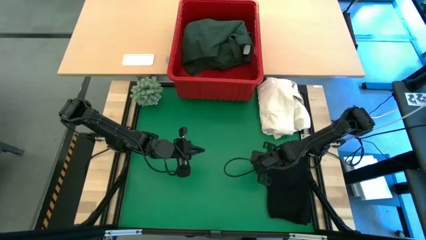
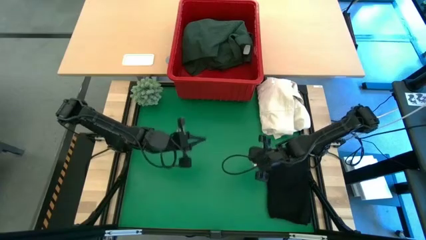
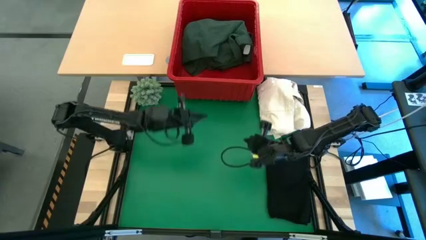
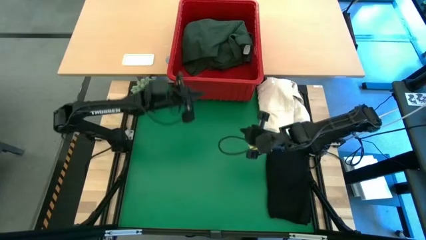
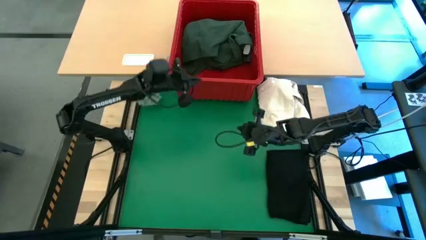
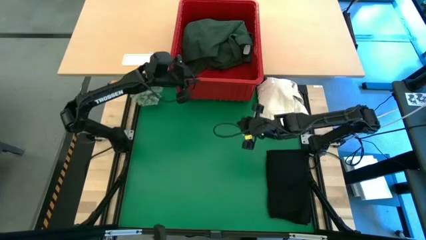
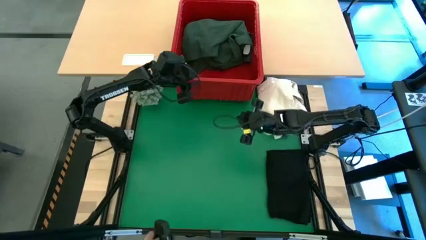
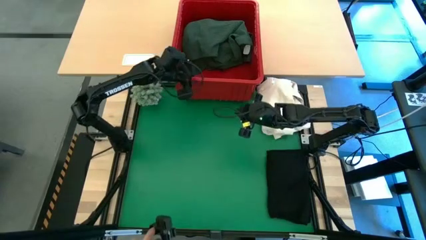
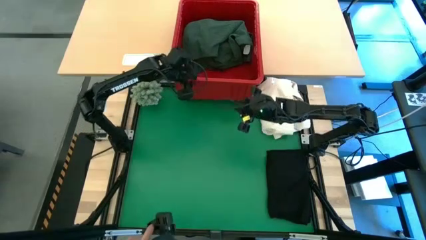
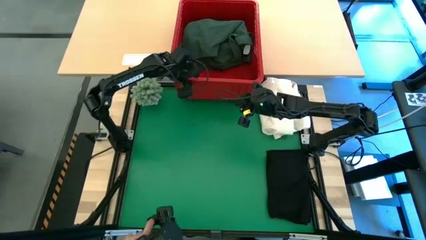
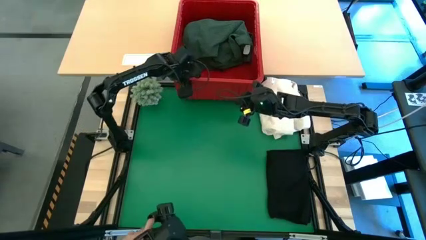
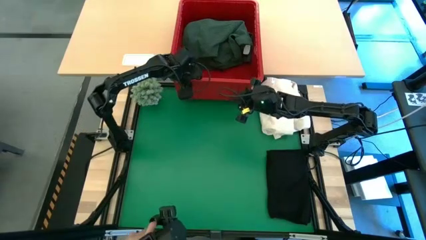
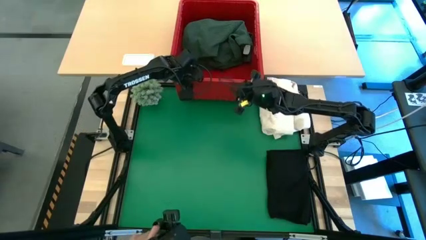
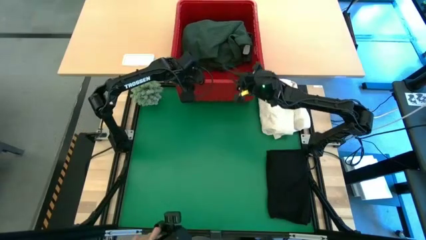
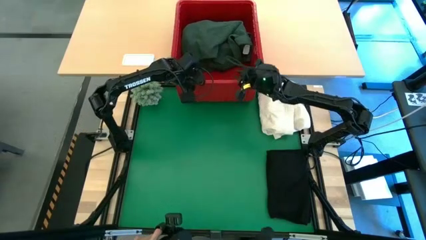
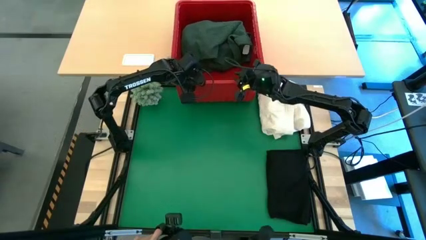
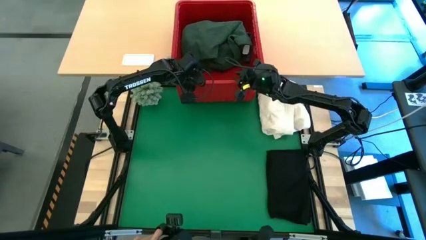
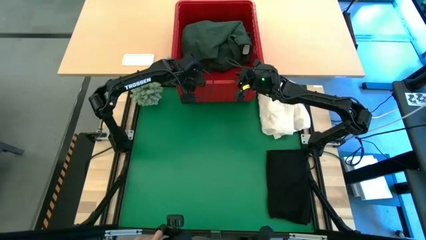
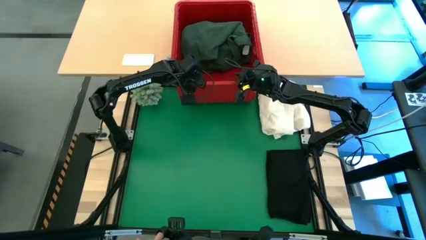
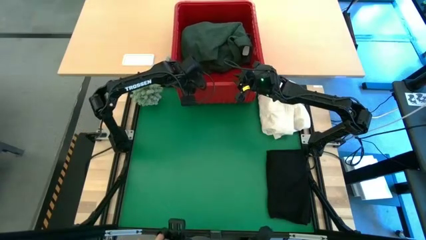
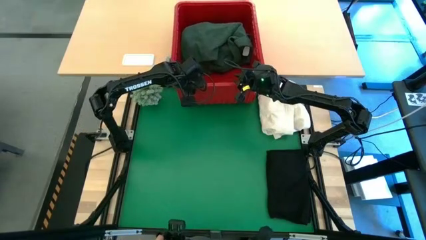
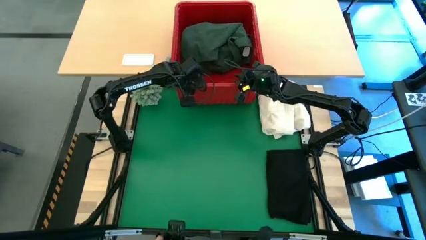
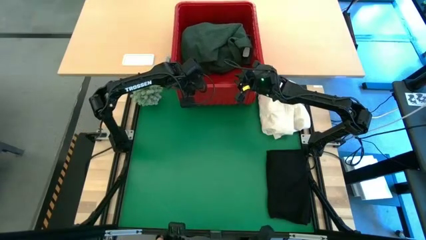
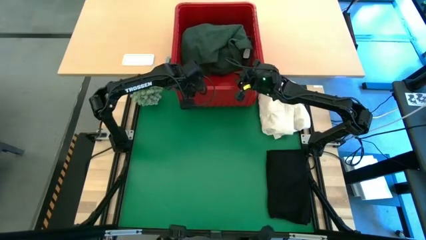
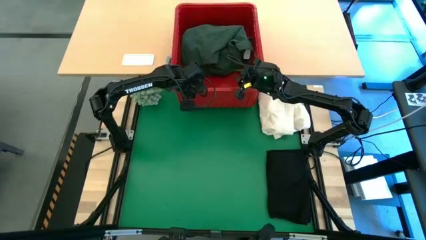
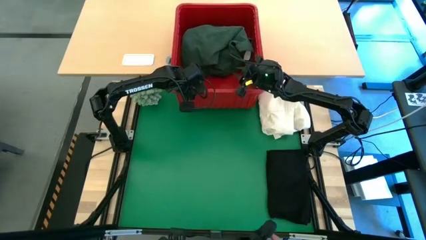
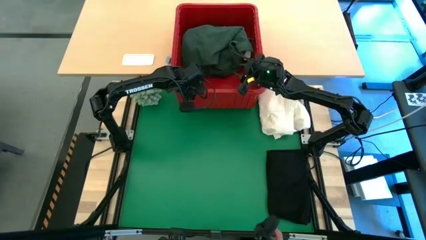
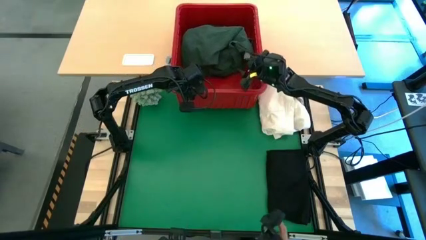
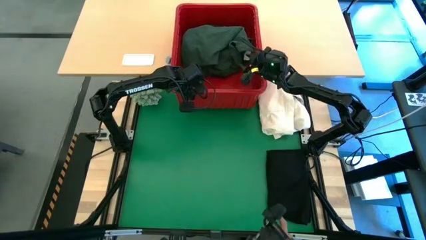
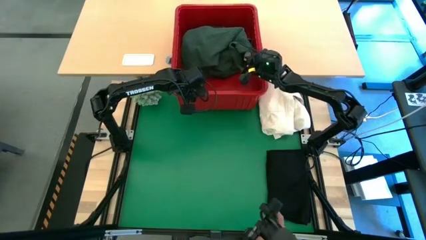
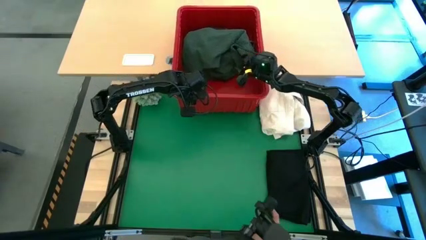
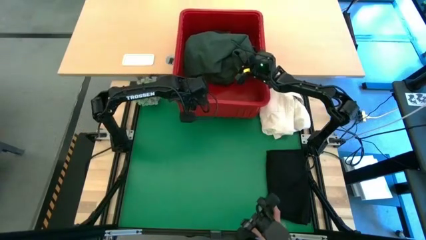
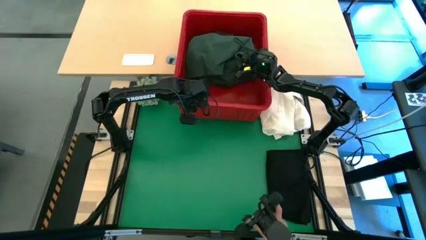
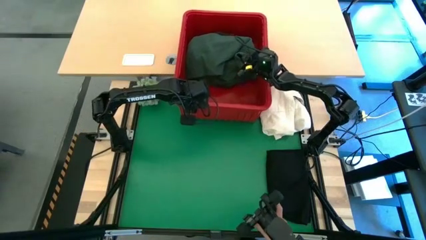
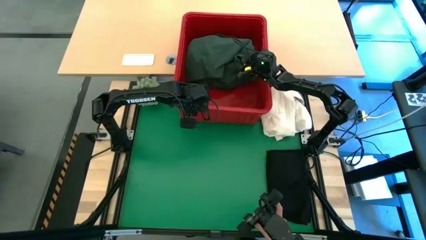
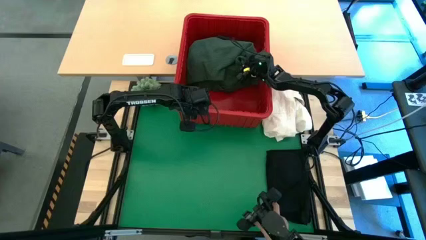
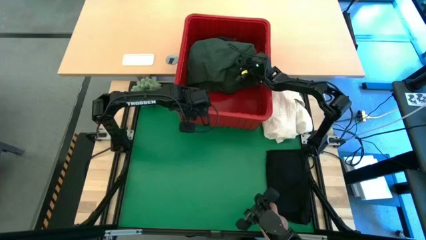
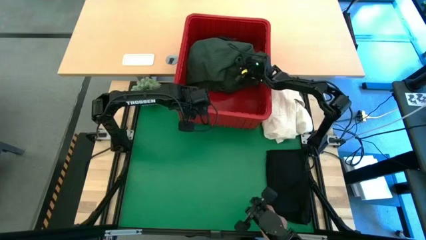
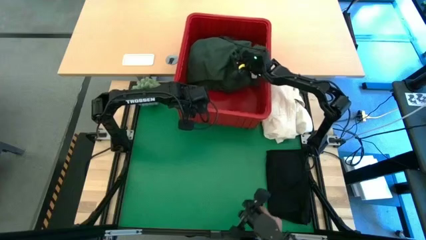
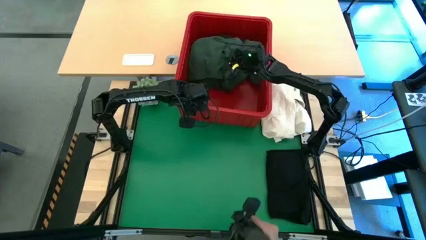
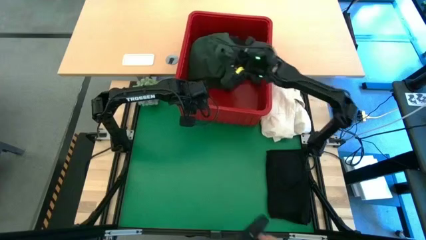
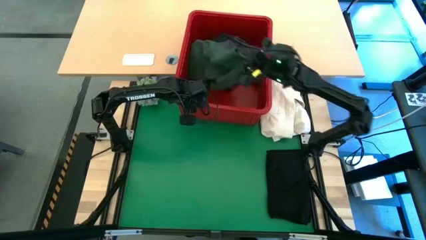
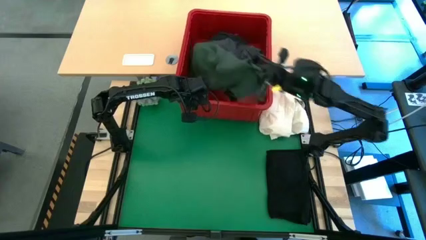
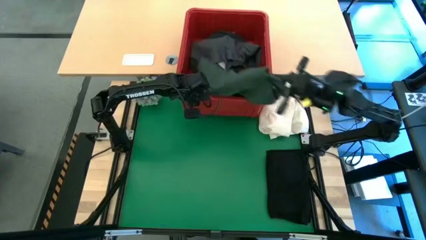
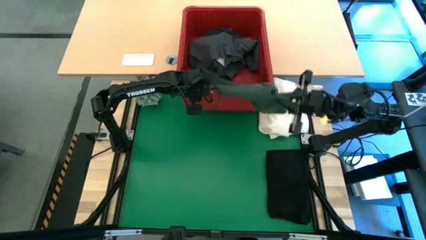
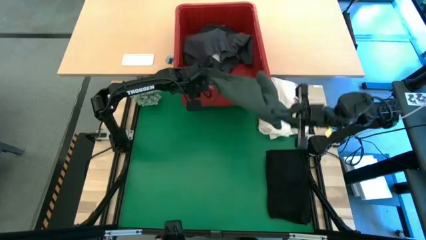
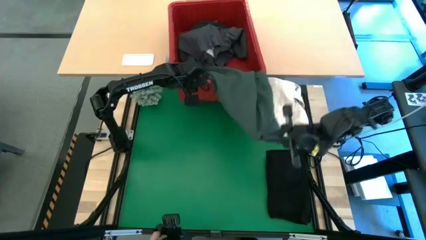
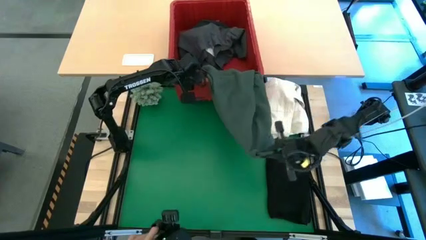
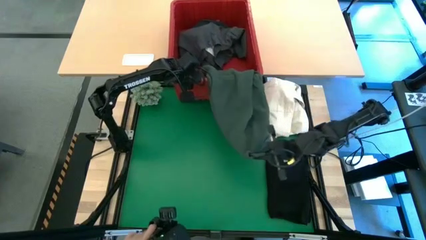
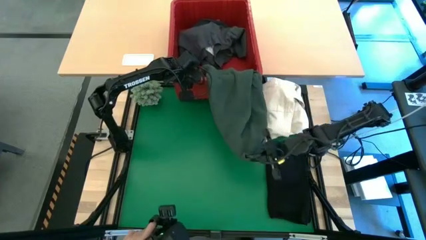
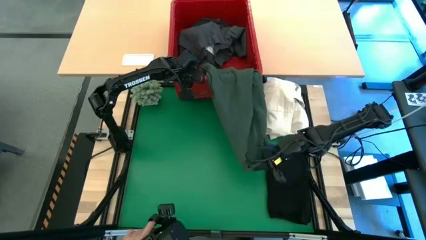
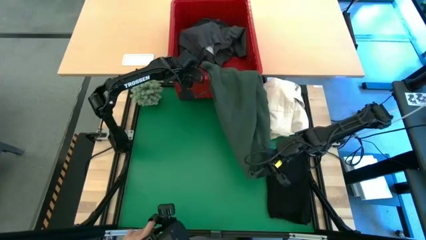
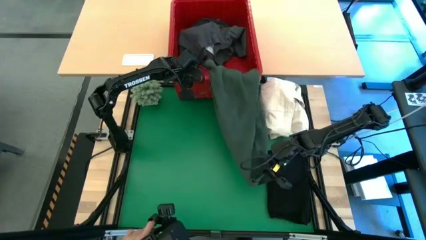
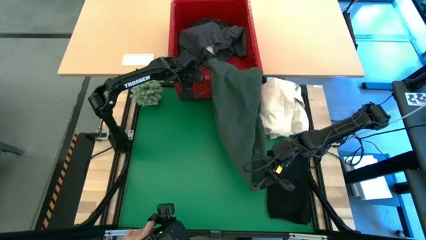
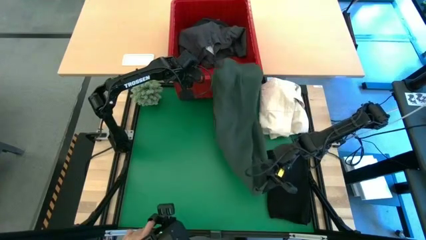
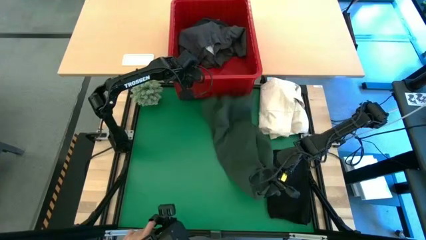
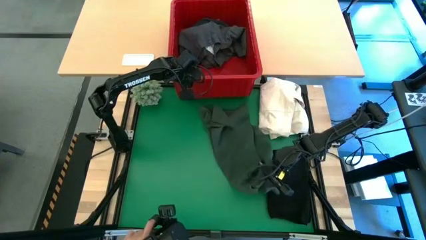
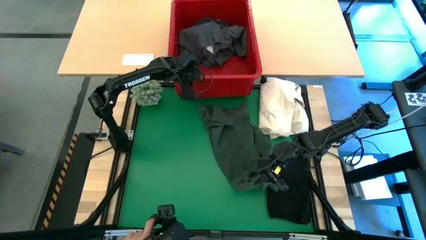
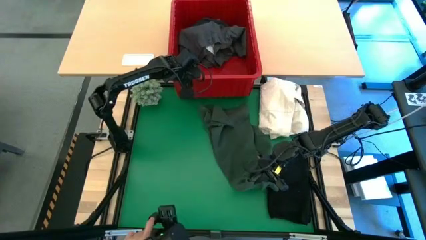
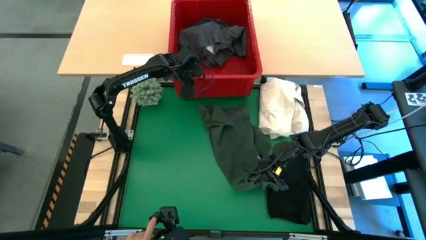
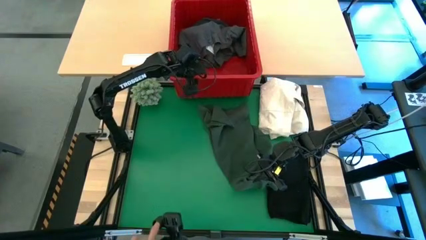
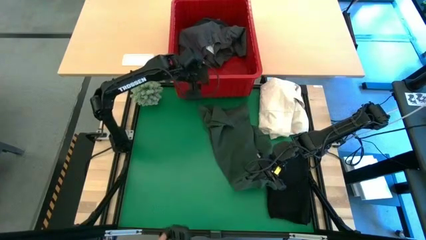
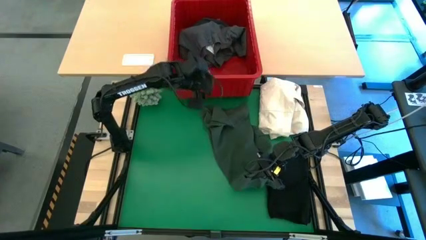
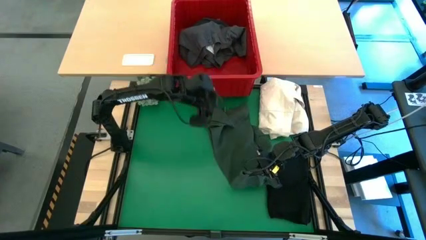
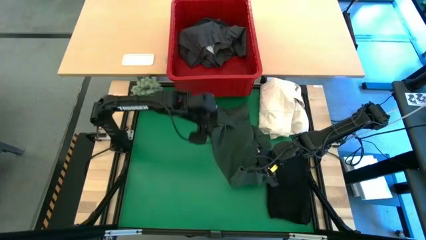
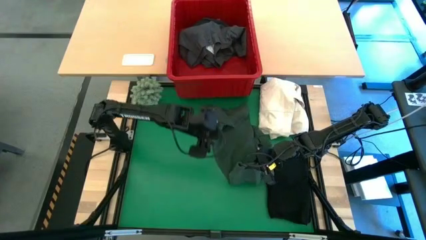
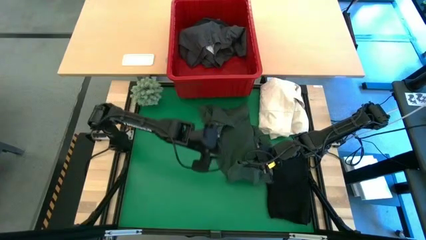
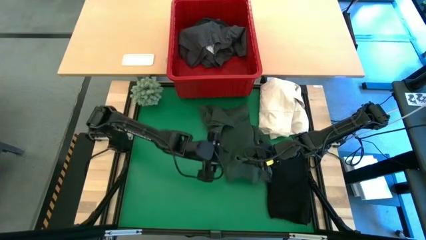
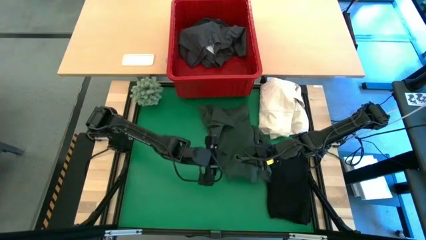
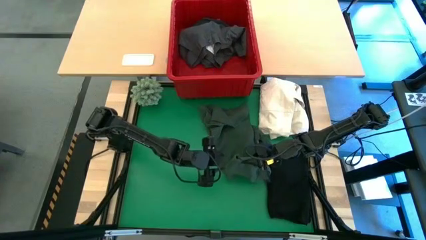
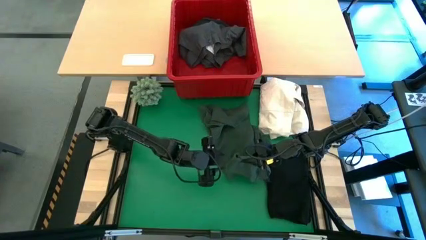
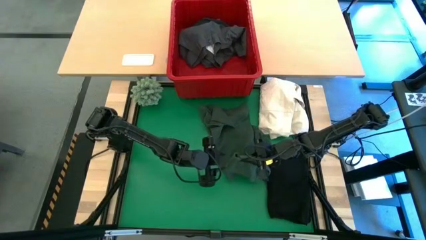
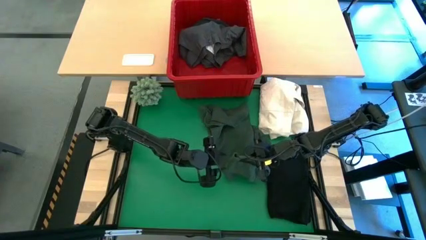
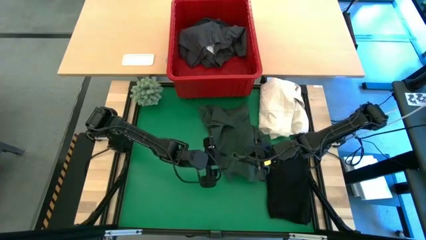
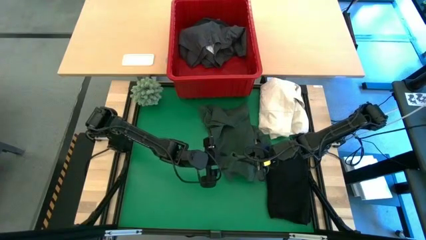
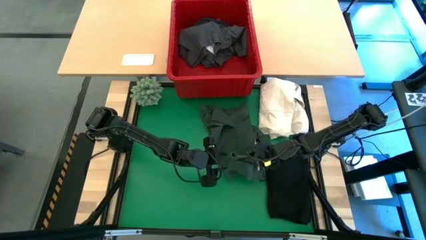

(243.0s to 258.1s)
Task: Fold laundry
Fold the green polo shirt

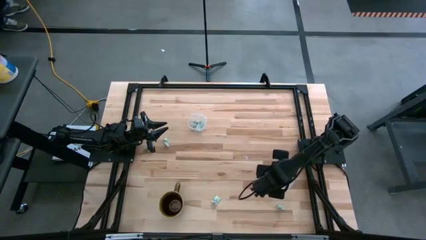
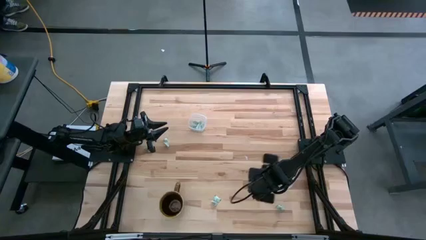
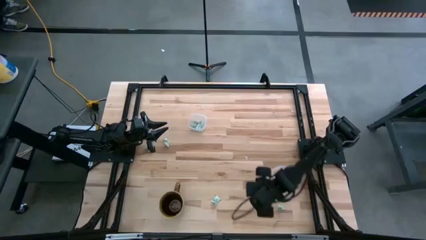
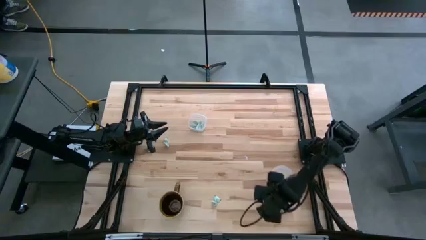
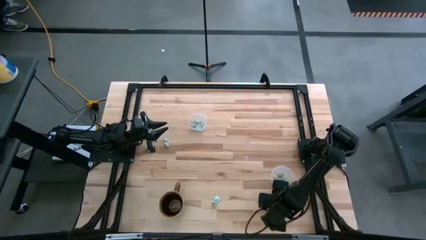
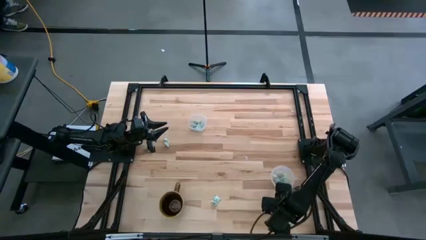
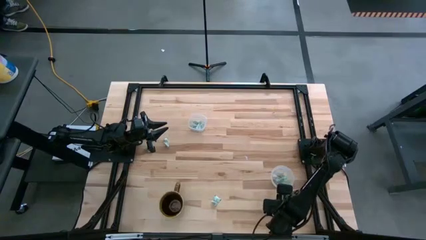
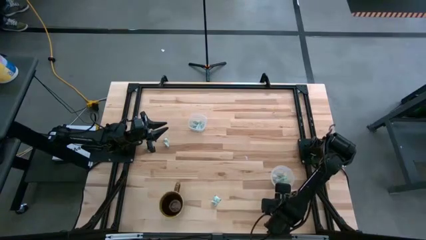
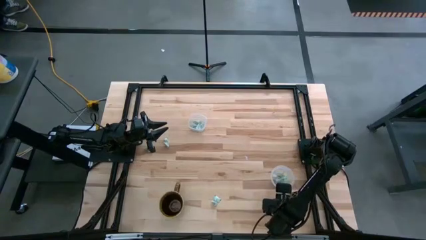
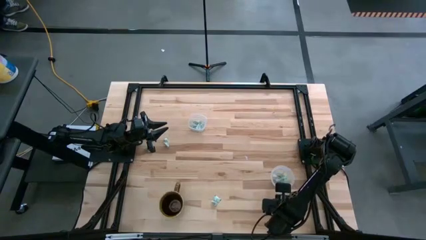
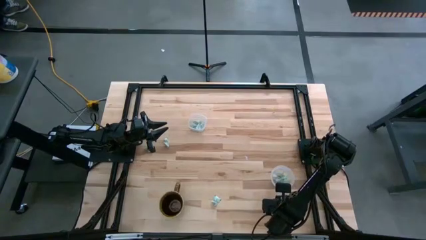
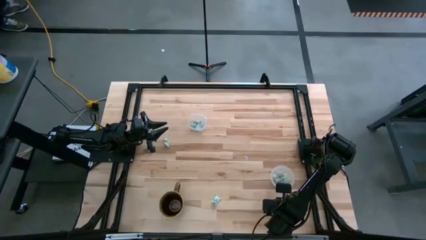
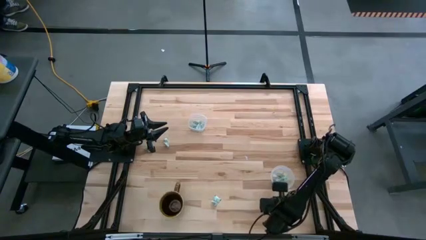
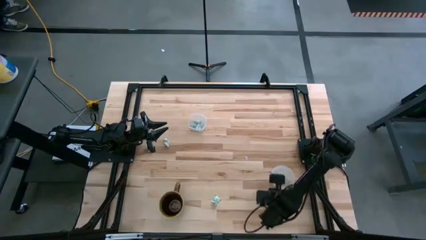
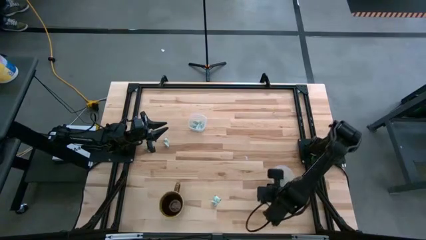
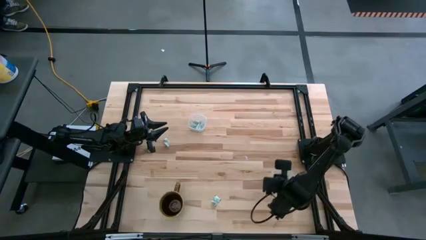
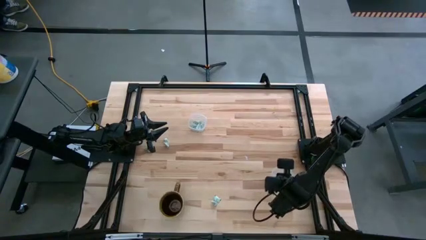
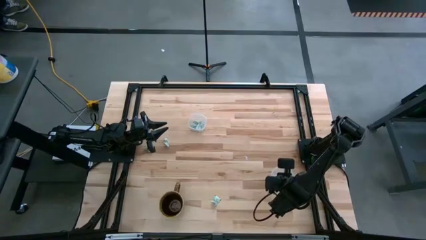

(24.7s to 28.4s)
Task: Pick and place items into bin
Put the white stevia packet into the bottom transparent bin
